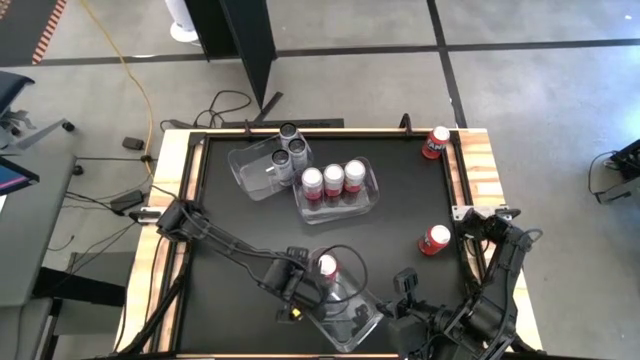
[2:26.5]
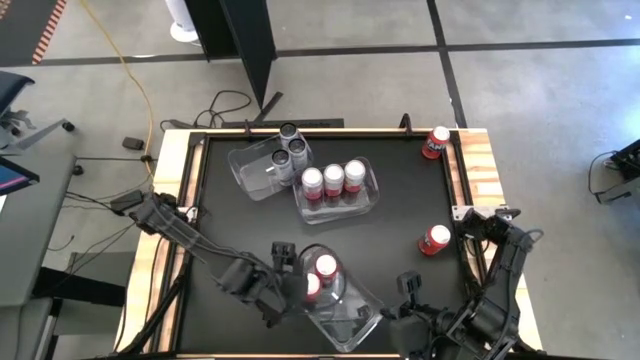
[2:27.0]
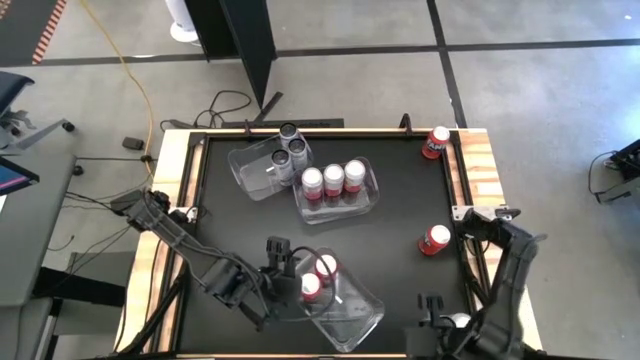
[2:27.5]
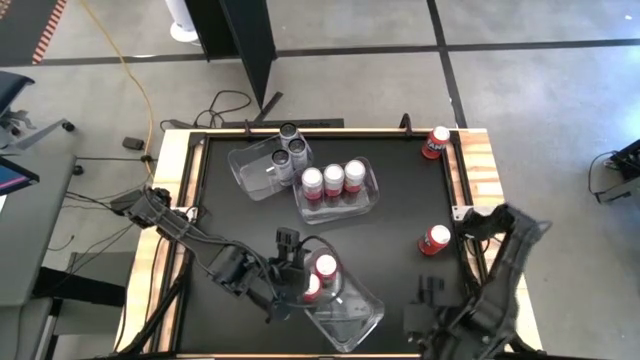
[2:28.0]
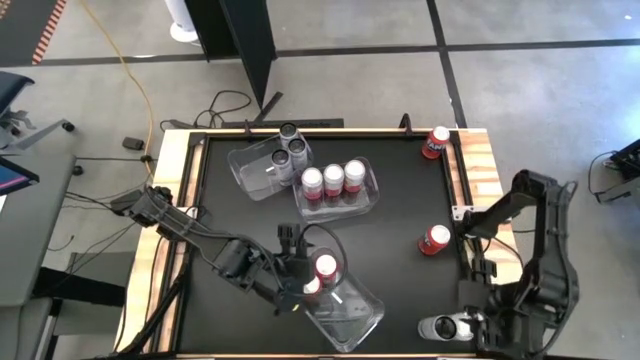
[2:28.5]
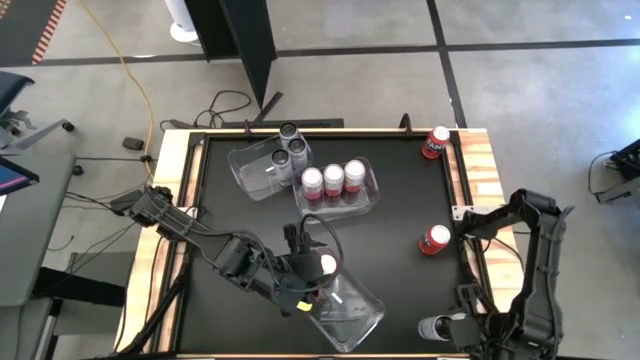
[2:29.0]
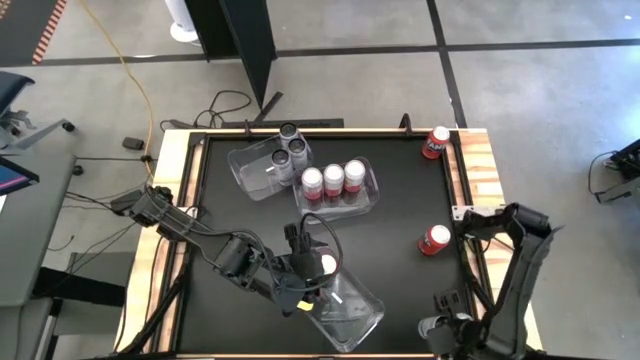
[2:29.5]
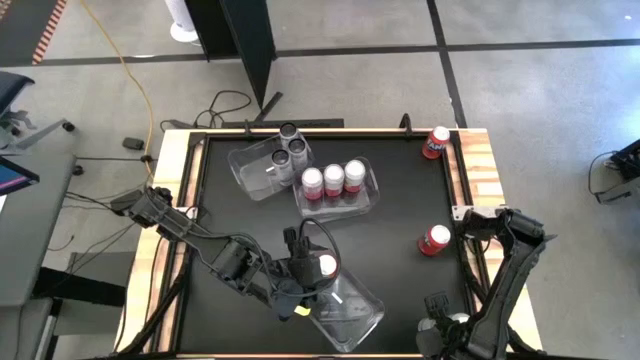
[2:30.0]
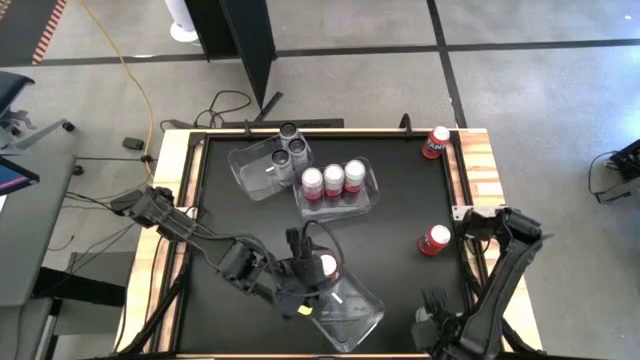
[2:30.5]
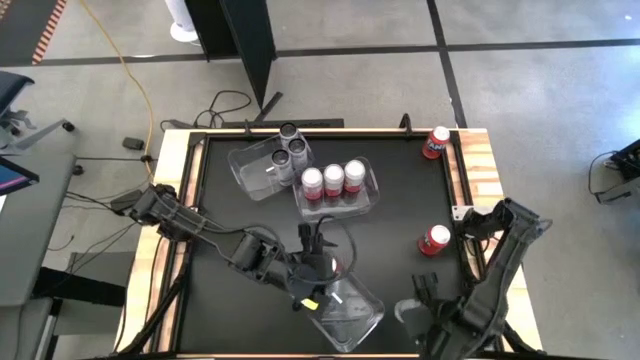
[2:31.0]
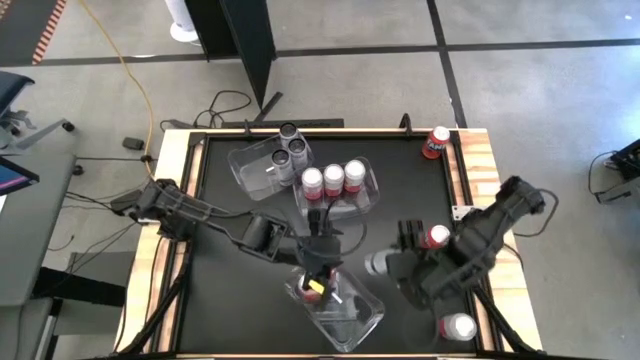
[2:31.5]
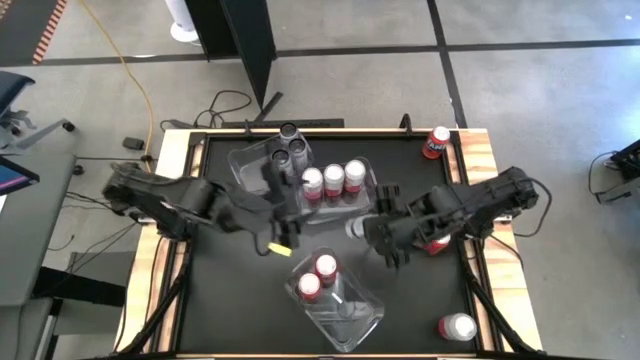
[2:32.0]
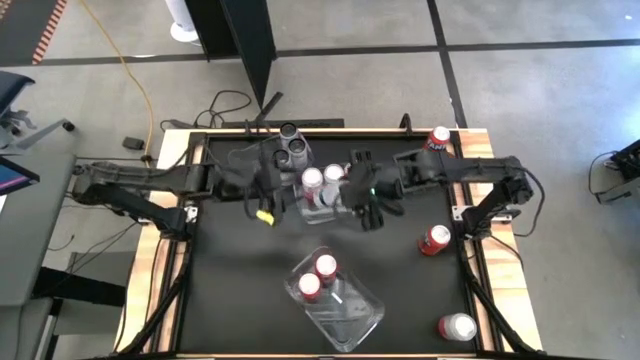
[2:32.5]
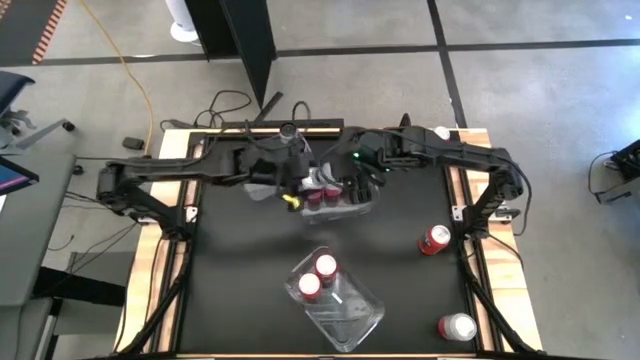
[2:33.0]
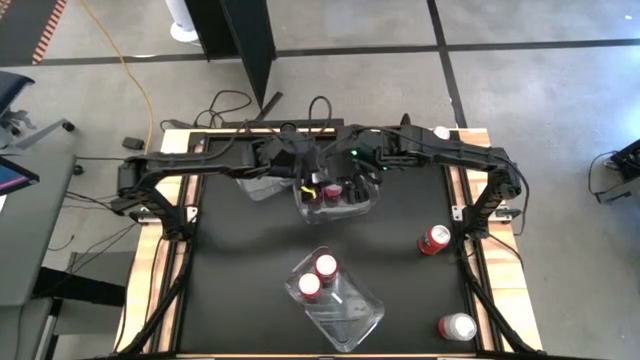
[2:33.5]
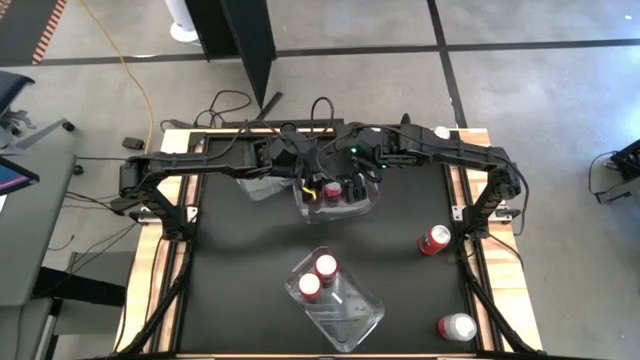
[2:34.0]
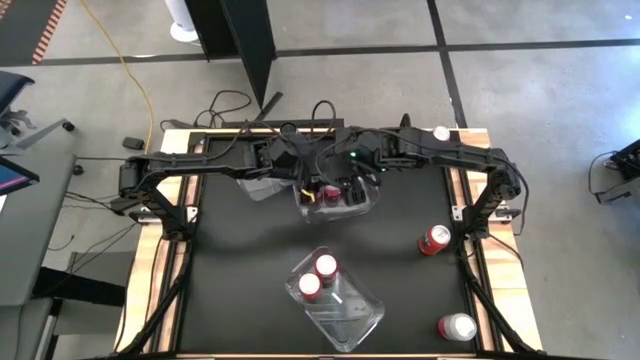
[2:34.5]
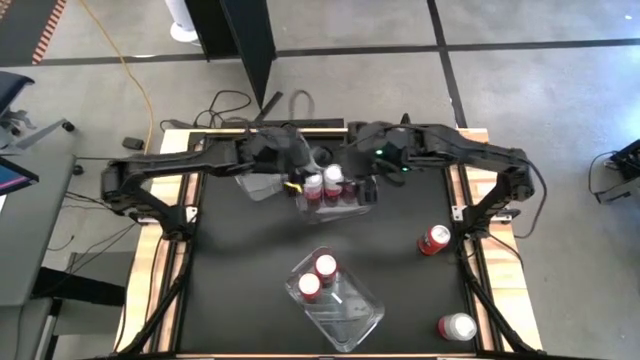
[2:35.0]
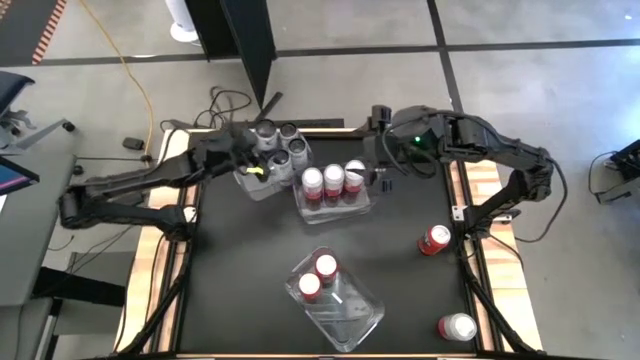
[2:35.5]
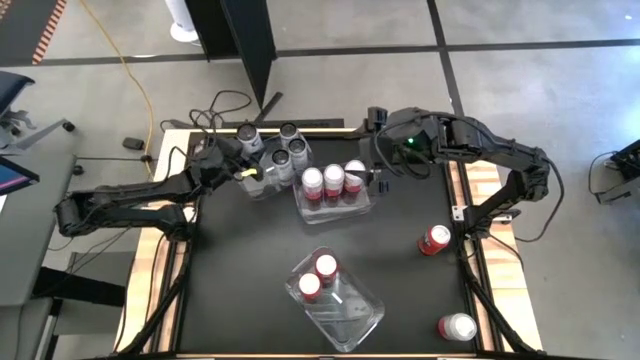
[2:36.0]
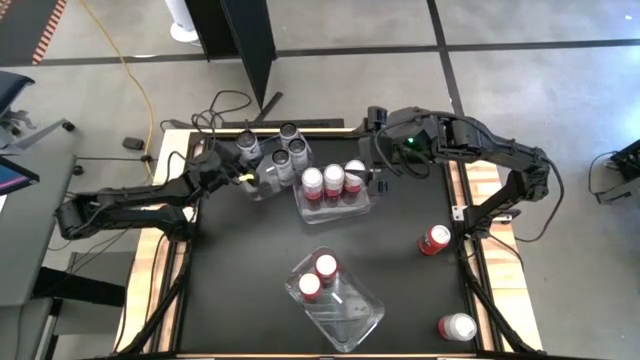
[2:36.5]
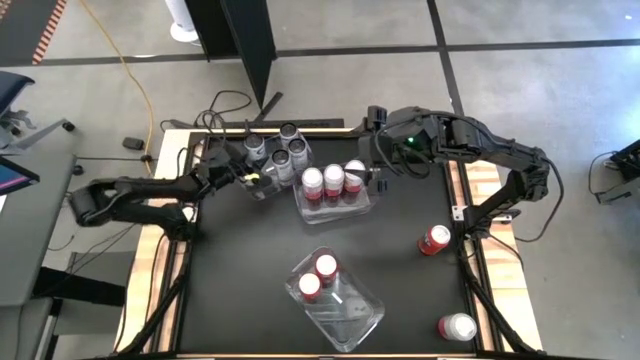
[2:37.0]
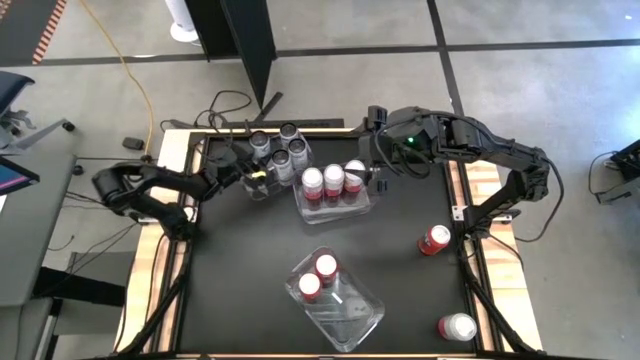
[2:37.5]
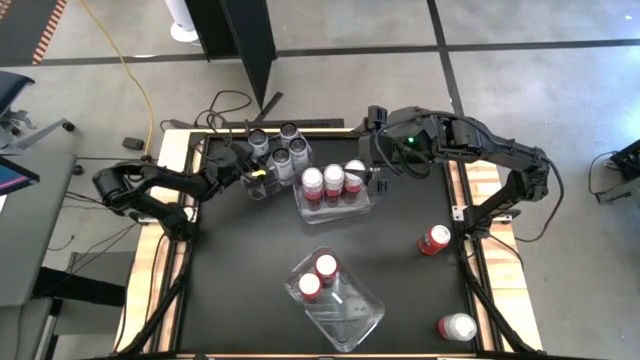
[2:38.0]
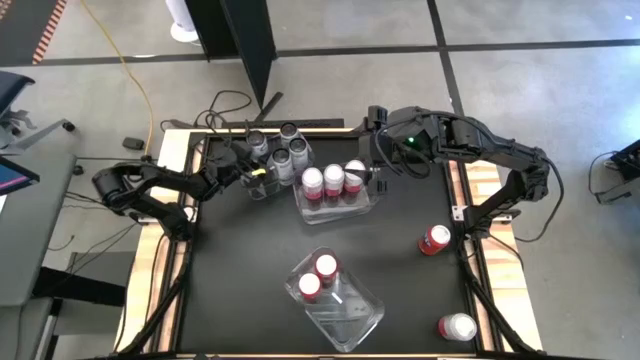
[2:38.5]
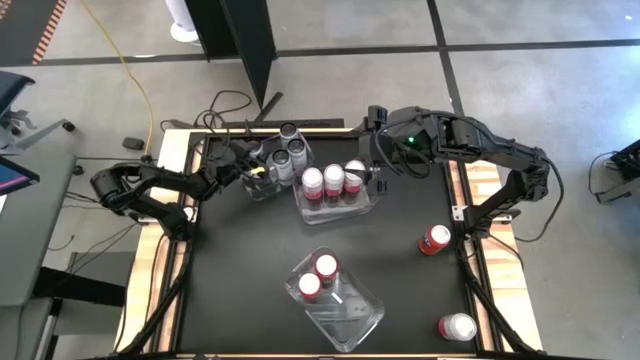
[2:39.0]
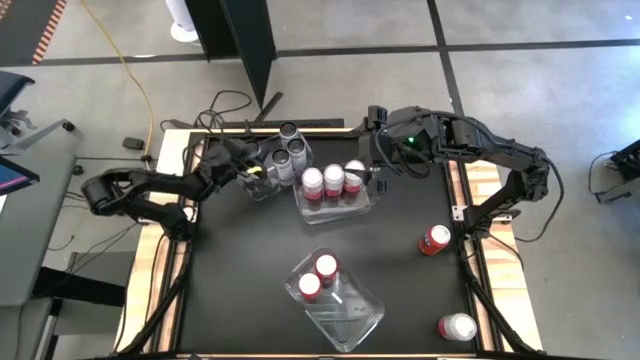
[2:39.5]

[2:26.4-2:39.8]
Task: Sort soda cans
Put the black soda can in the top left transparent bin

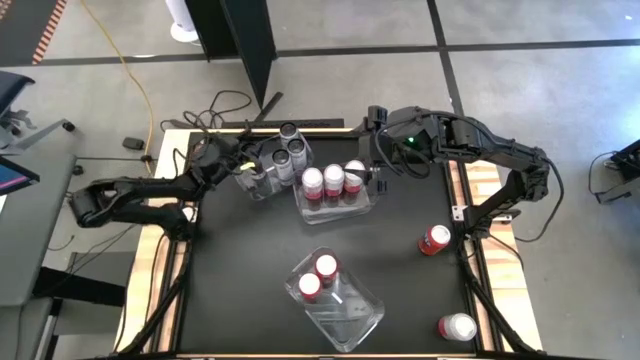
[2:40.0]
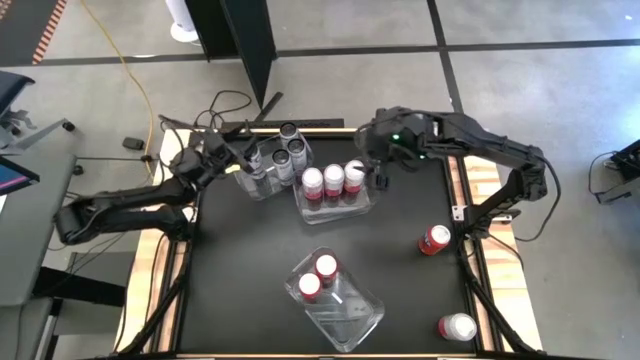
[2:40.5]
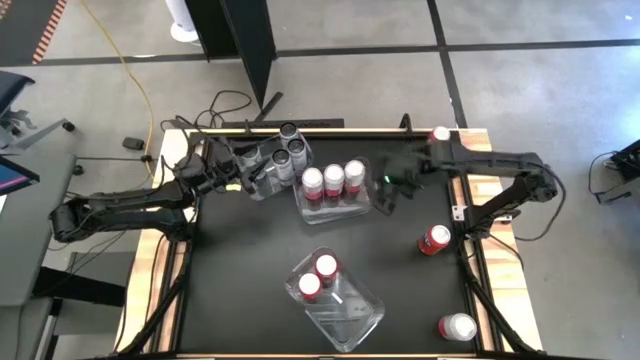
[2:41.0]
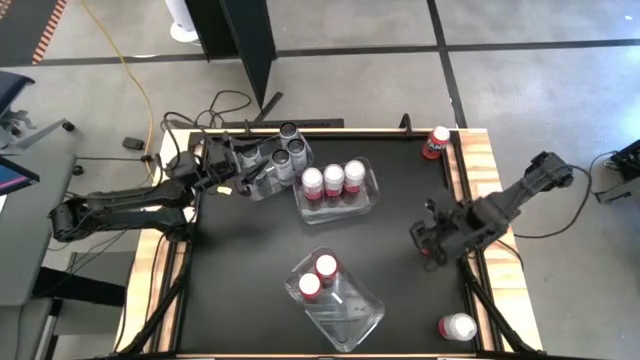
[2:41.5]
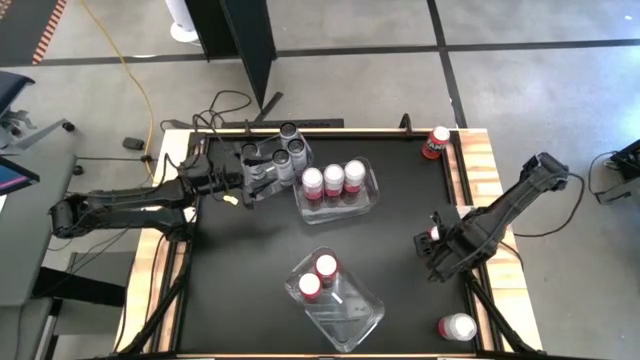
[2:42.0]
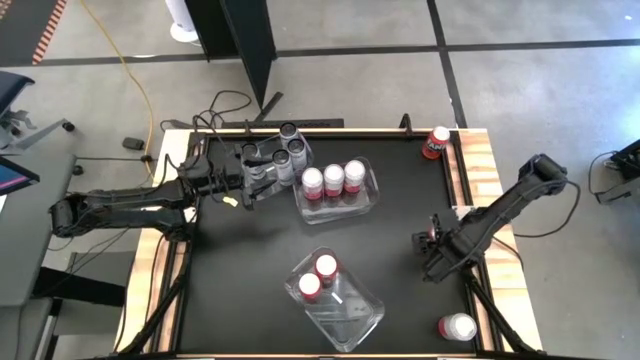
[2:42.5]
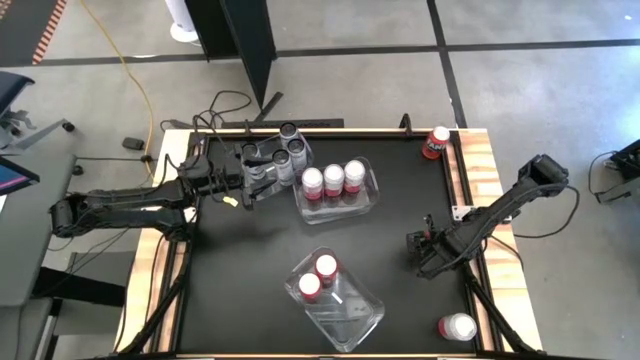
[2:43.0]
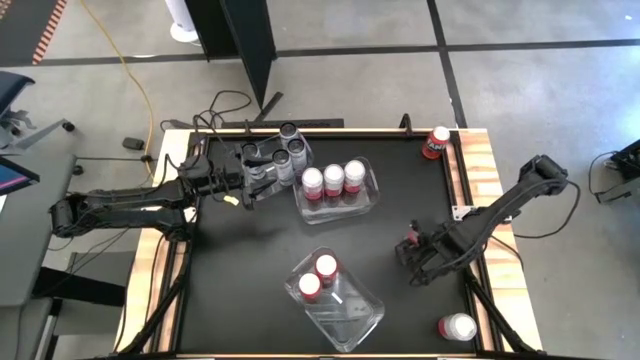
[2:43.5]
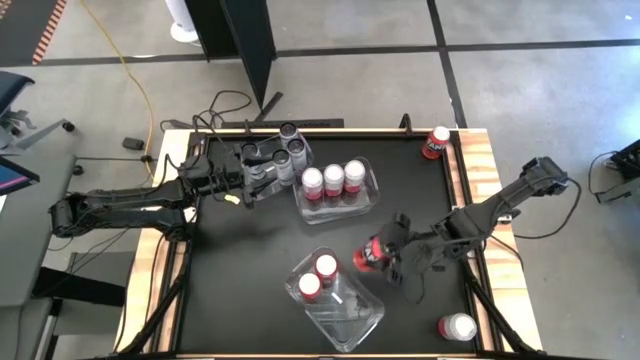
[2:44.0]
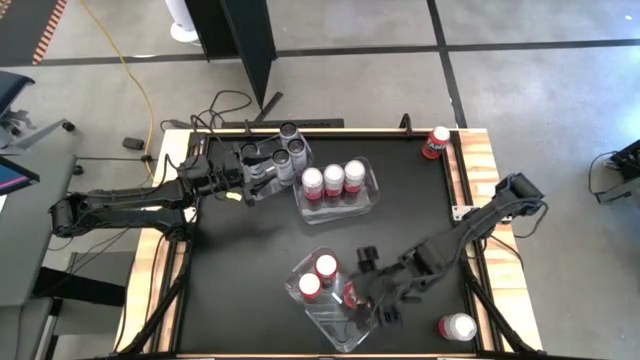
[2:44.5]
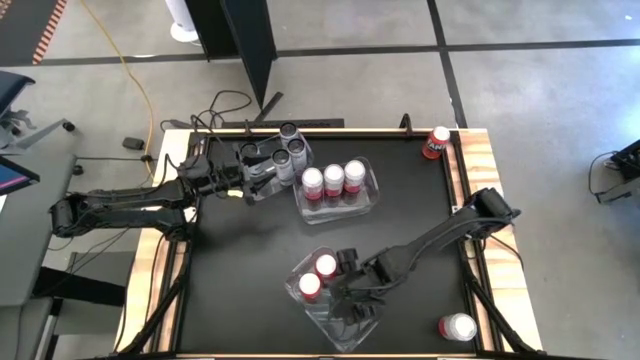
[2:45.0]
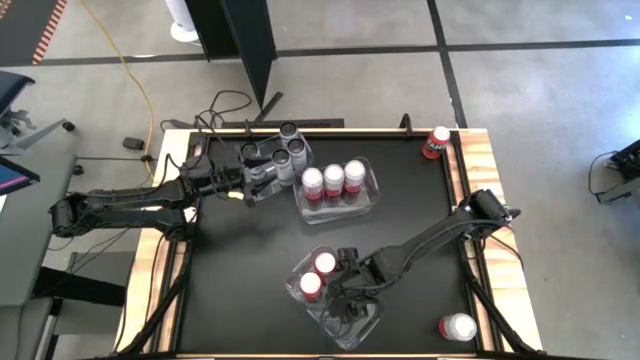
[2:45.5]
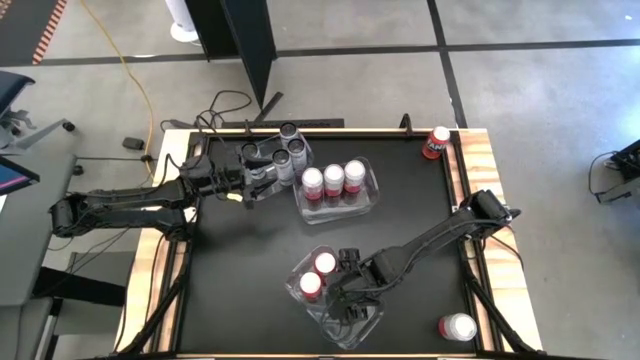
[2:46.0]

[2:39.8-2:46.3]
Put the bottom orange soda can in the bottom transparent bin
